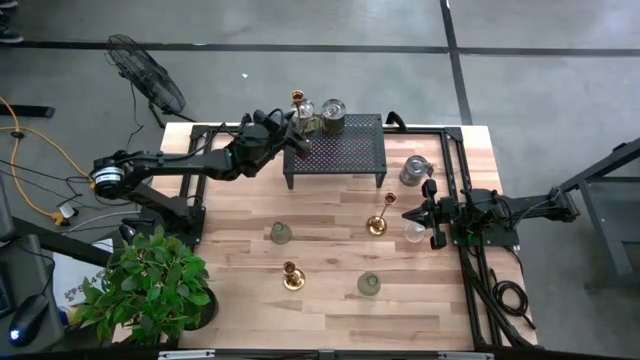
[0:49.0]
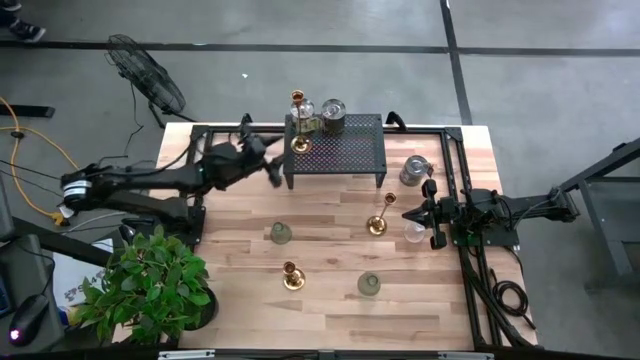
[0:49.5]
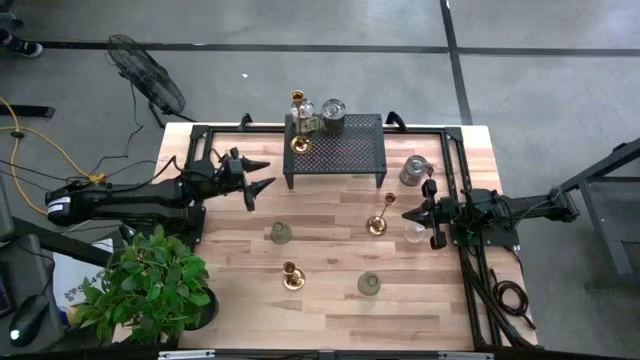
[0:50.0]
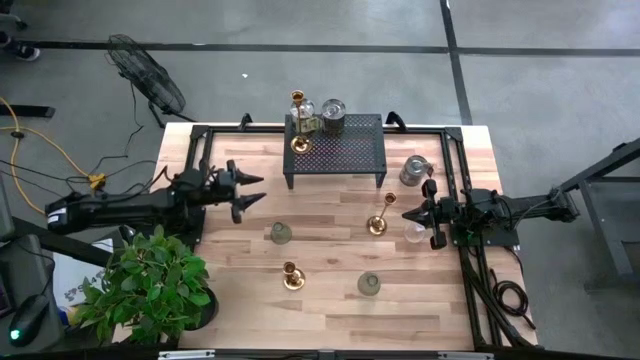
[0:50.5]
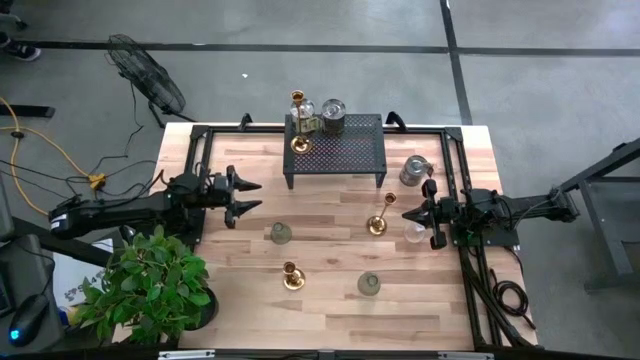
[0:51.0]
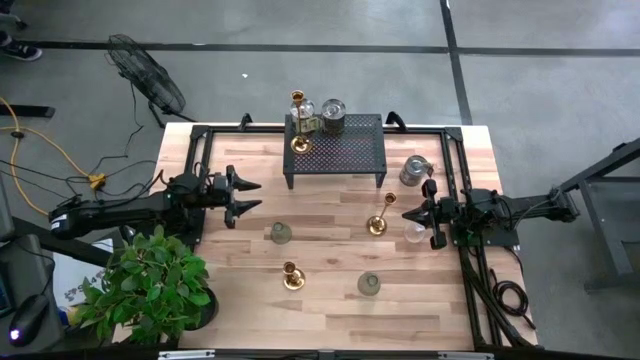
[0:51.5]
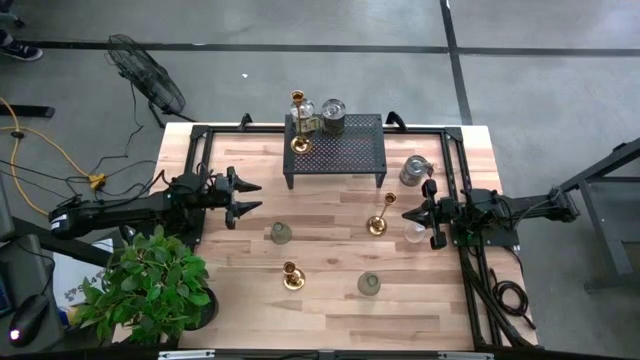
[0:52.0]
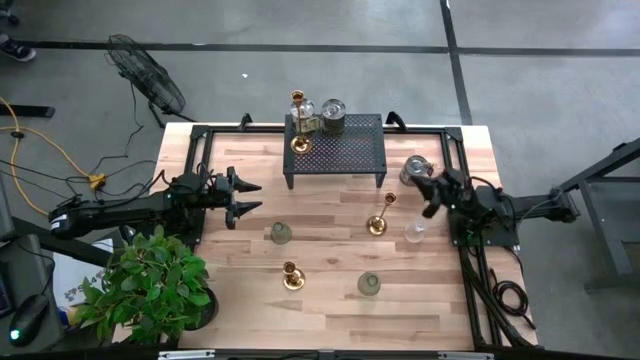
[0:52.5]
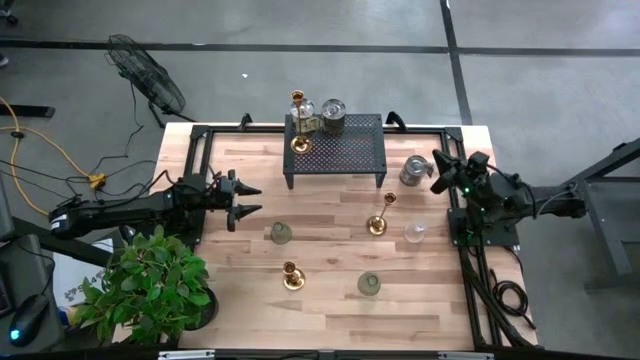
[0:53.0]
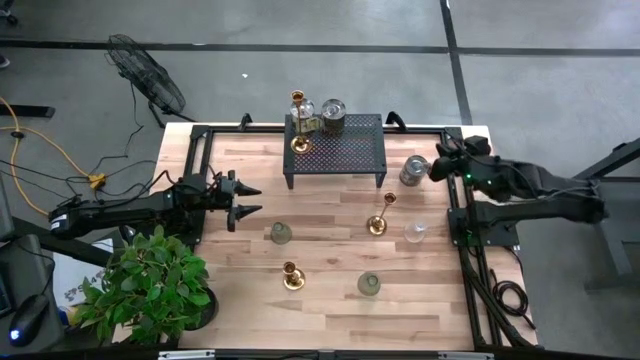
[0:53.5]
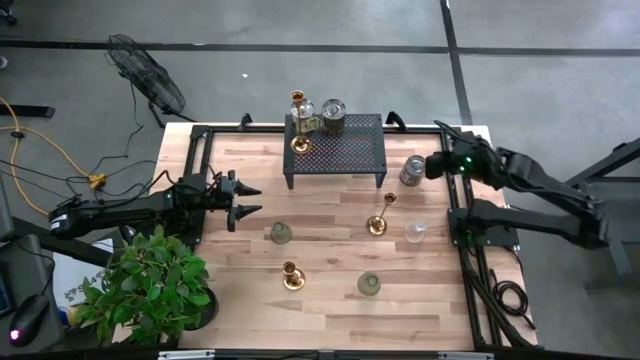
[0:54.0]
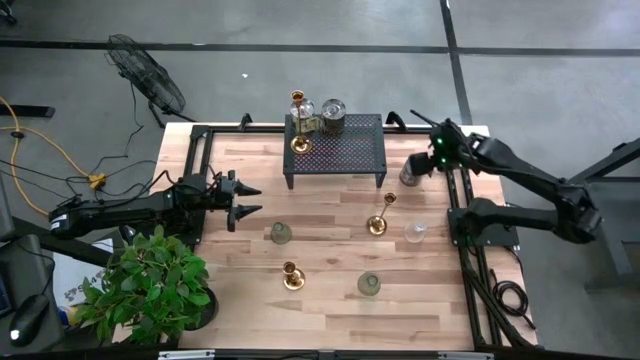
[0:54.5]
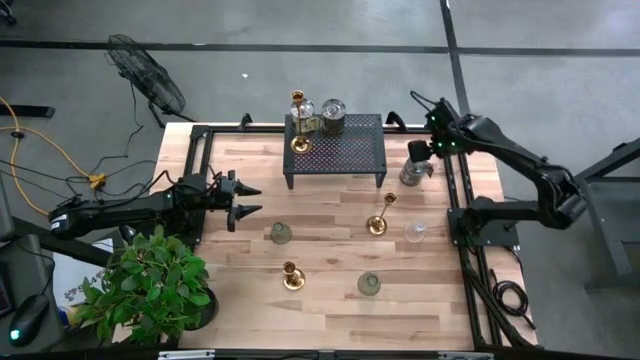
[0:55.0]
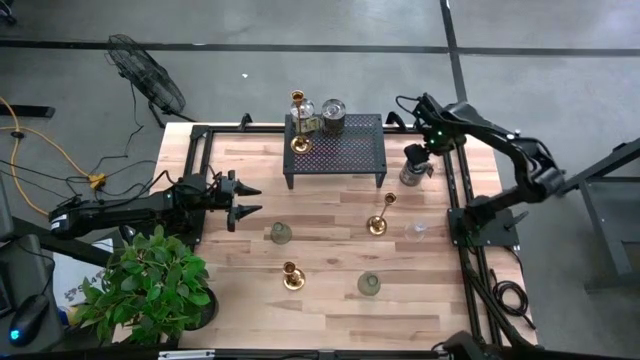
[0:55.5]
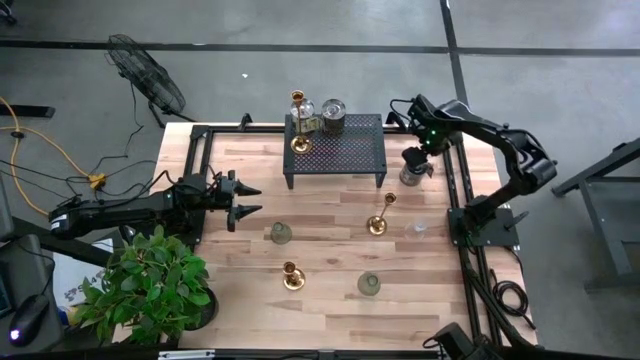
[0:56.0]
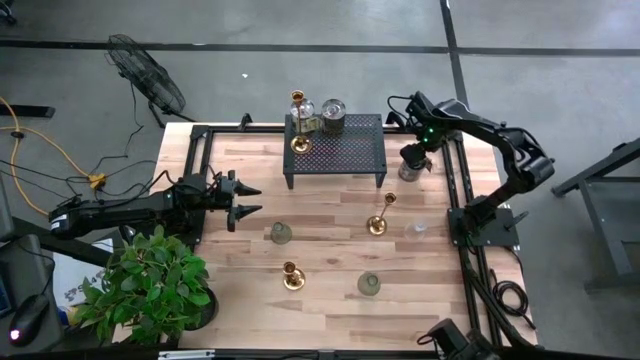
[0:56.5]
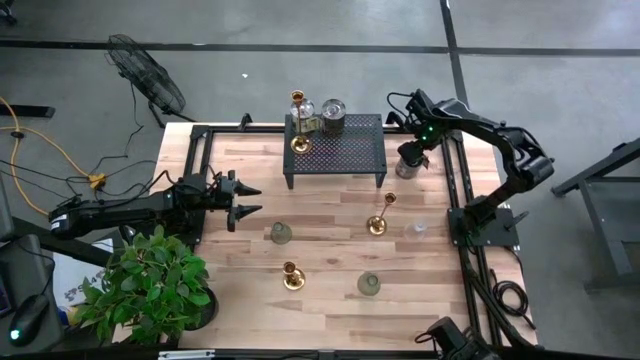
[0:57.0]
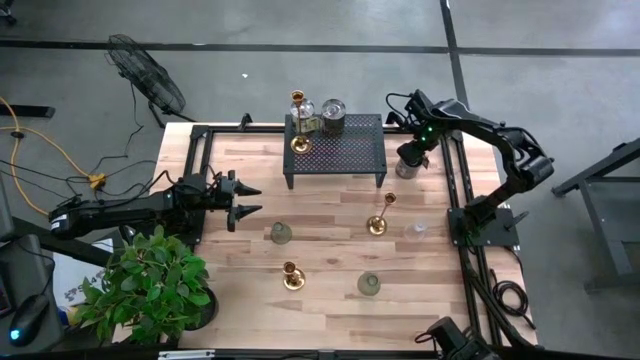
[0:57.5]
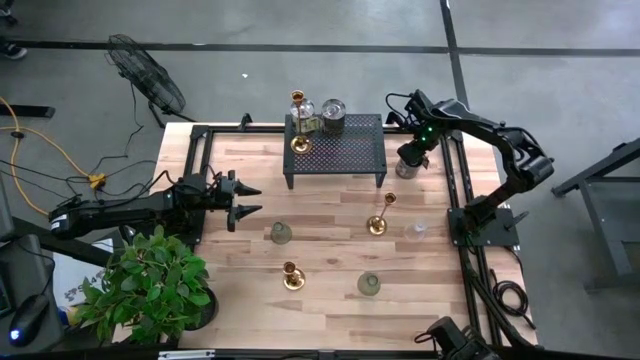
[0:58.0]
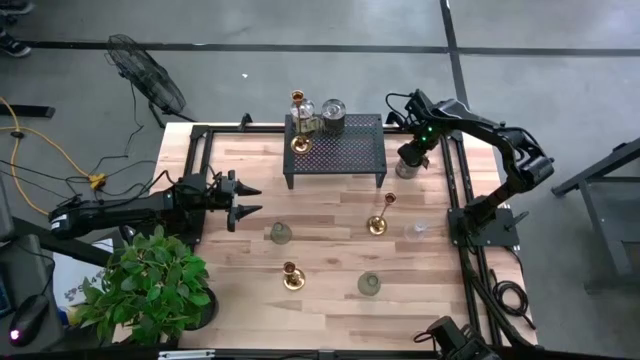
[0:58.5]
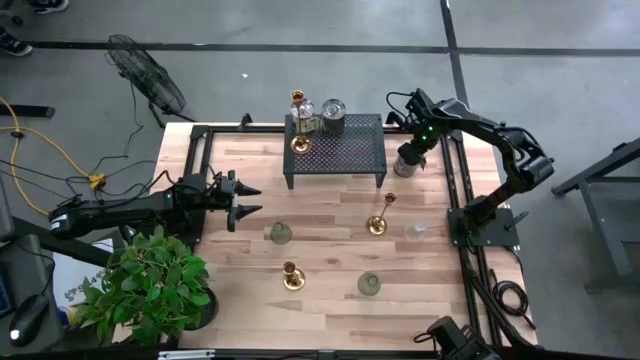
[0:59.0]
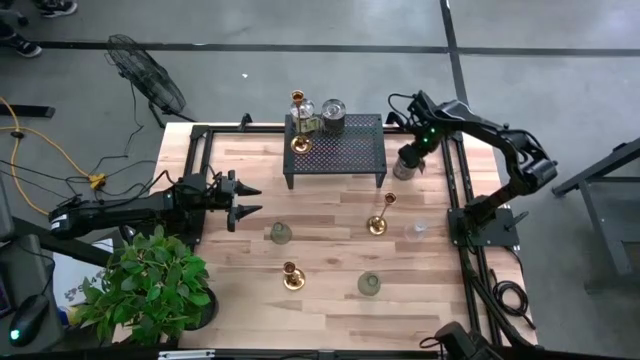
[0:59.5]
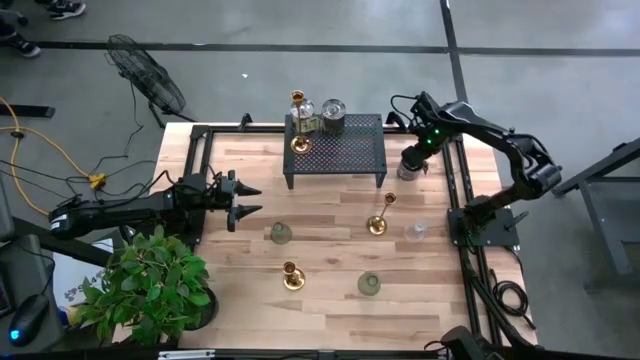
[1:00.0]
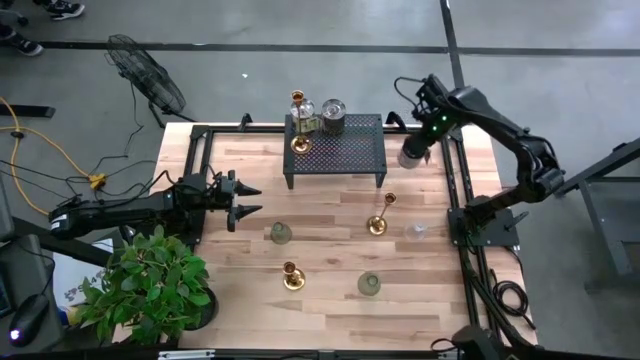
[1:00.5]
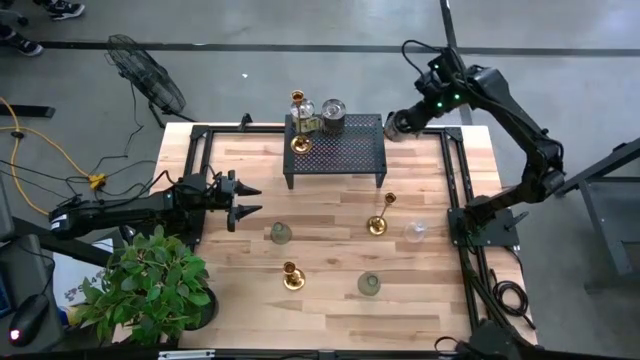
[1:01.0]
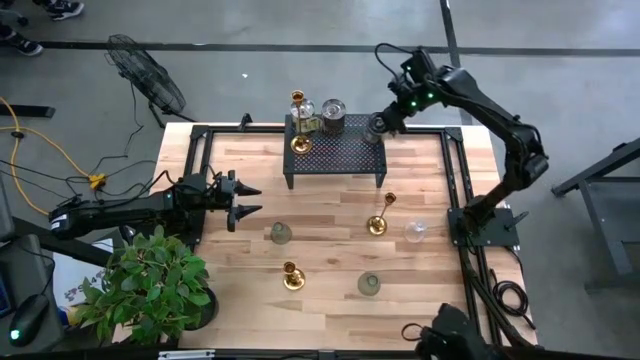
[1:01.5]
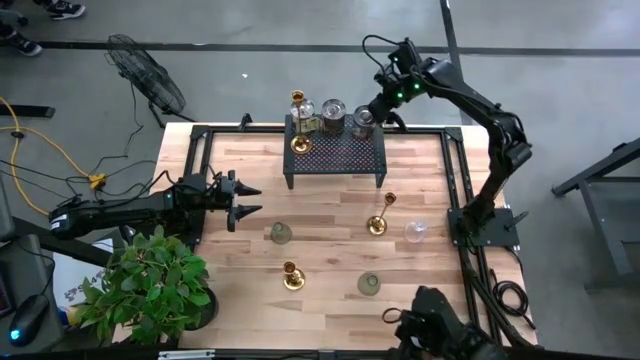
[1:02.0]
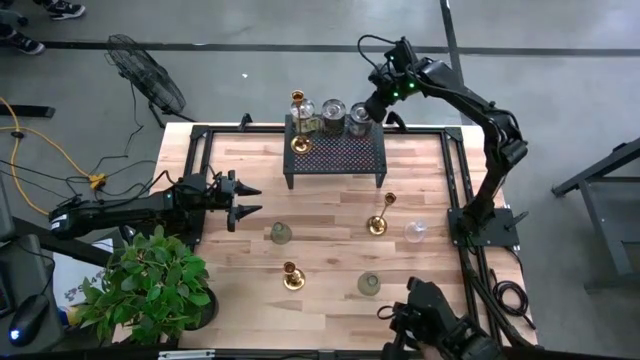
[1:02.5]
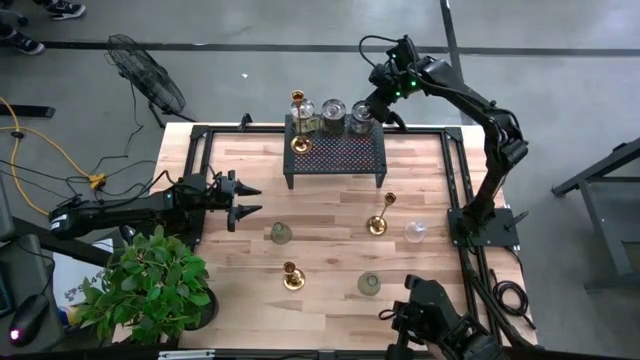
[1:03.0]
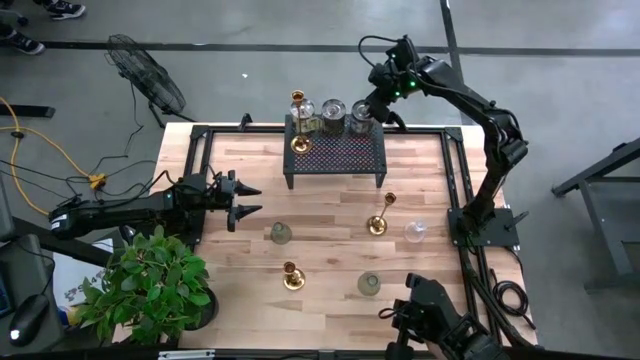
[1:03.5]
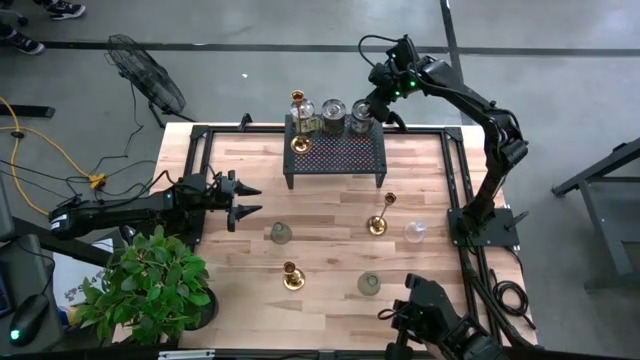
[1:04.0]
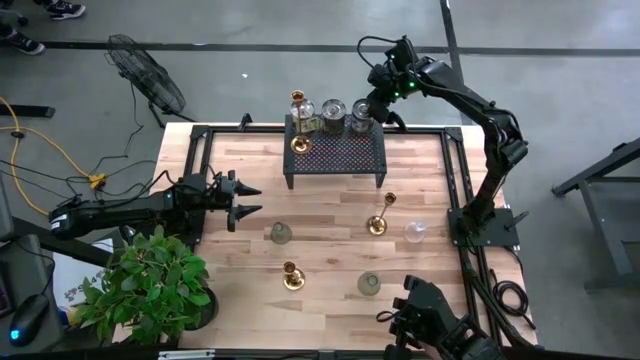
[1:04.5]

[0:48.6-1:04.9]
Task: Stock candles on shelf
Put the silver scented candle on the shelf

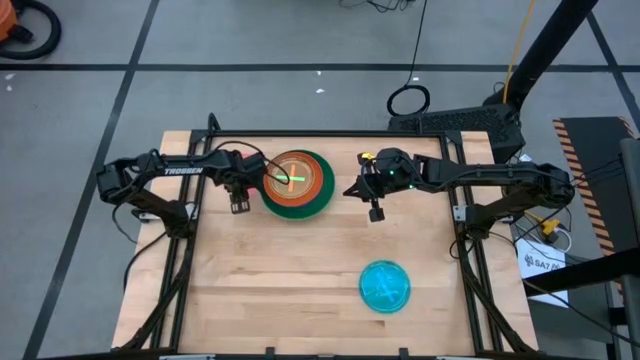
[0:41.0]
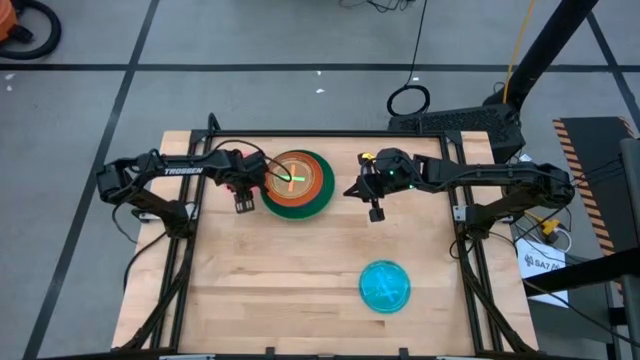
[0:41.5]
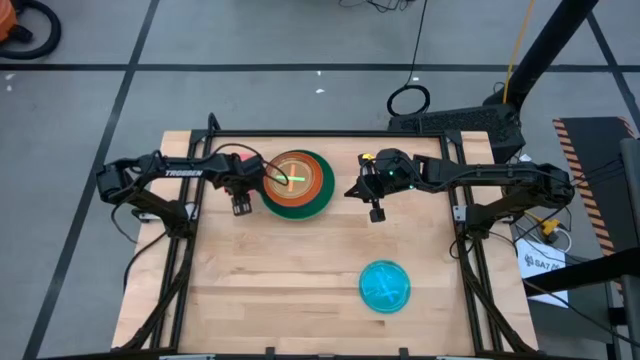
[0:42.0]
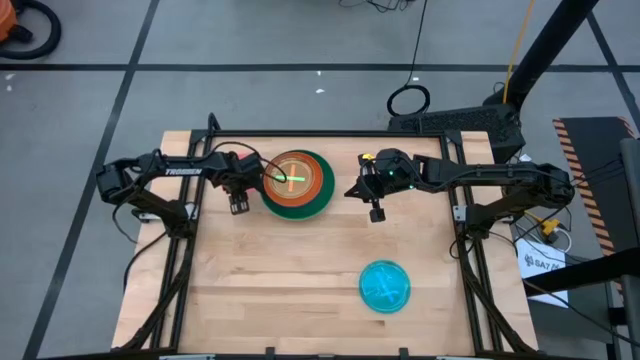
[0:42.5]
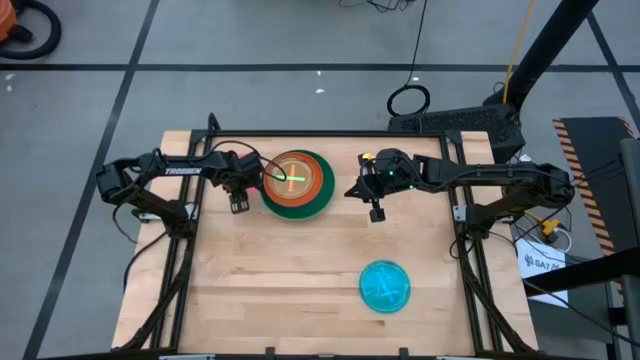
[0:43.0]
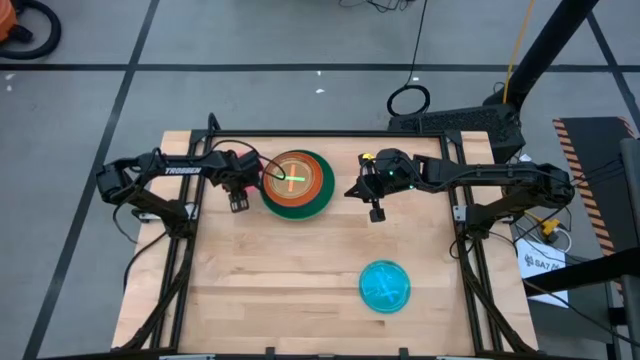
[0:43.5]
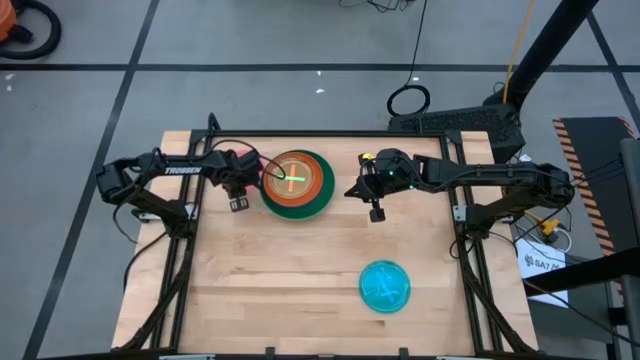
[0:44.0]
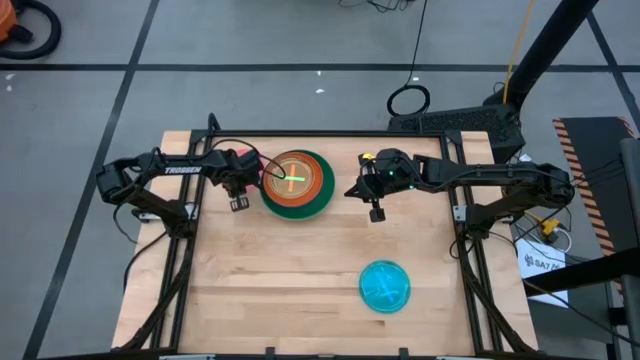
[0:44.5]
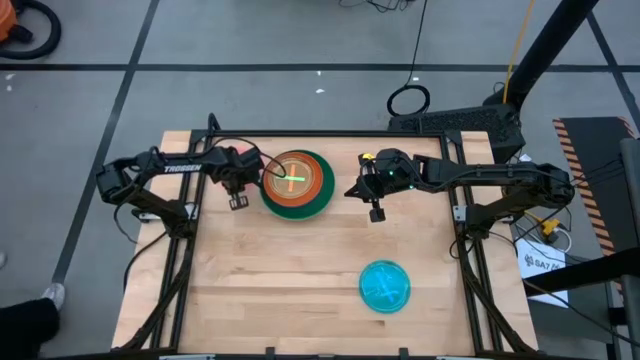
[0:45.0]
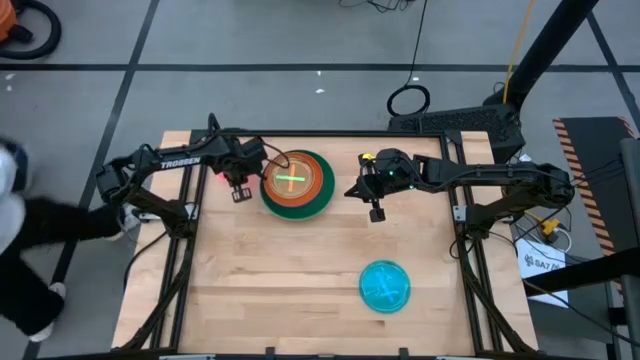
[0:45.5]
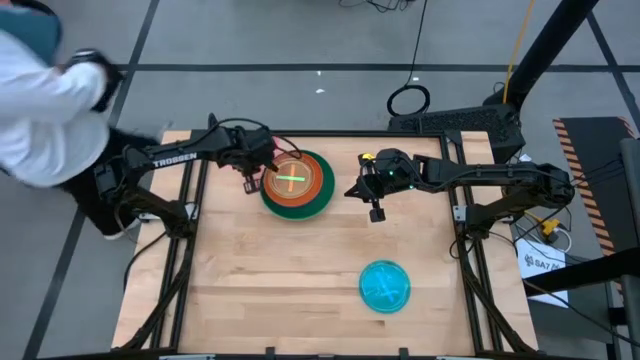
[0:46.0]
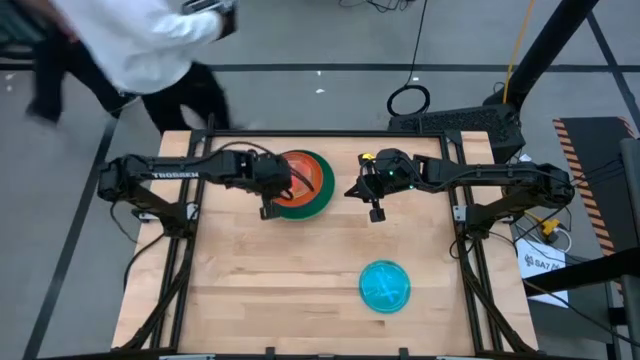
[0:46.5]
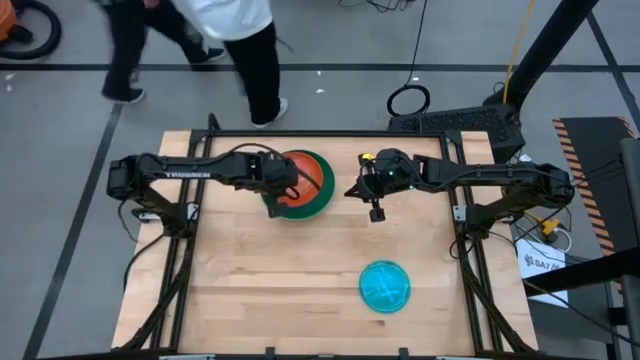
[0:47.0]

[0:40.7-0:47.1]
Task: Stack plastic plates
Stack the pink plate on top of the light green plate
